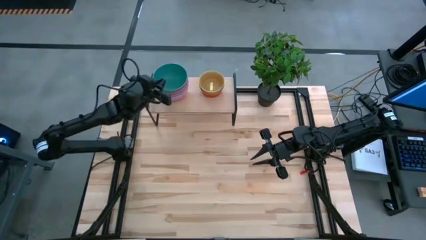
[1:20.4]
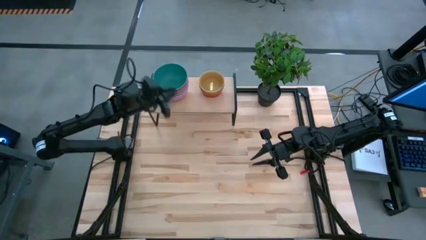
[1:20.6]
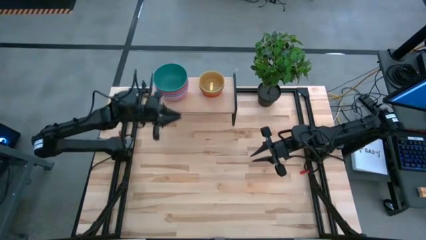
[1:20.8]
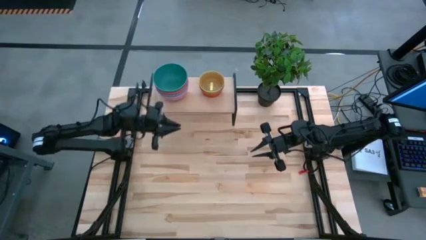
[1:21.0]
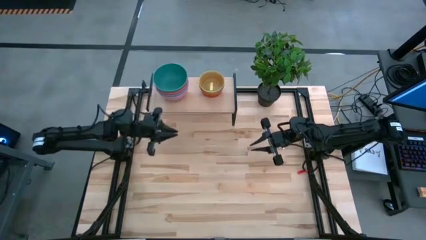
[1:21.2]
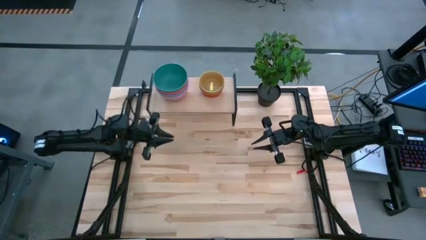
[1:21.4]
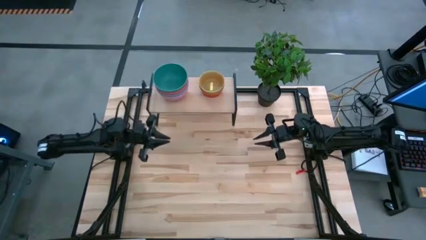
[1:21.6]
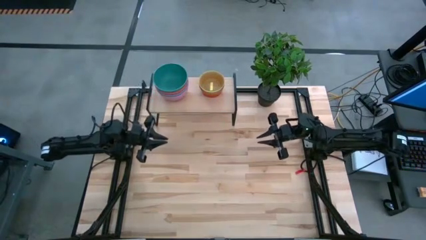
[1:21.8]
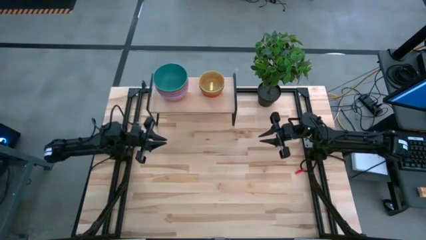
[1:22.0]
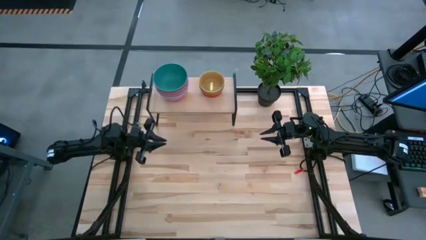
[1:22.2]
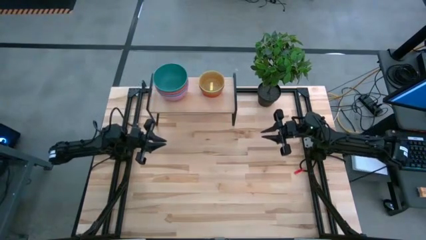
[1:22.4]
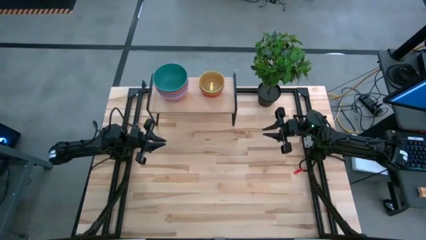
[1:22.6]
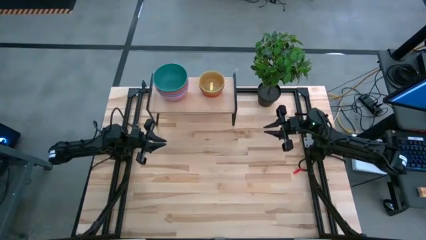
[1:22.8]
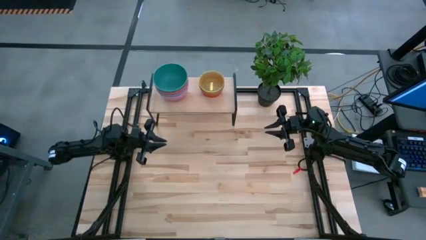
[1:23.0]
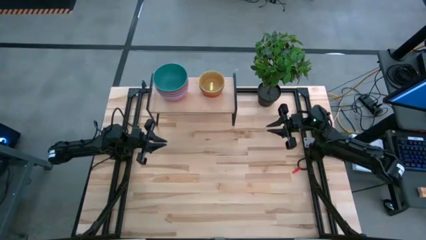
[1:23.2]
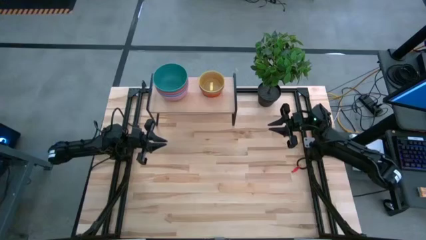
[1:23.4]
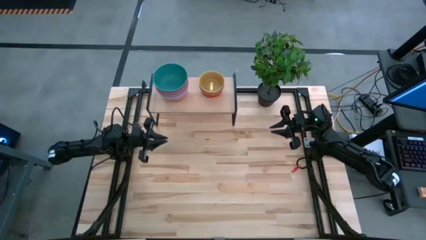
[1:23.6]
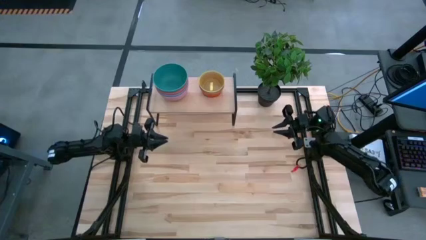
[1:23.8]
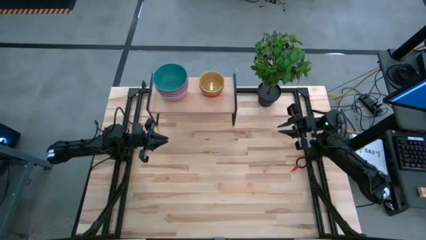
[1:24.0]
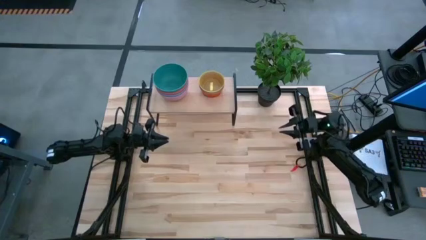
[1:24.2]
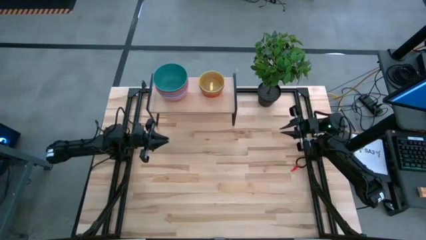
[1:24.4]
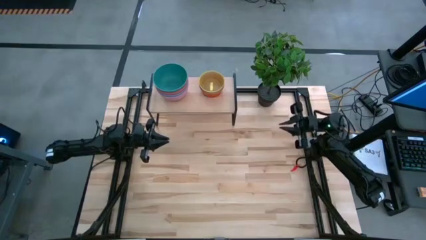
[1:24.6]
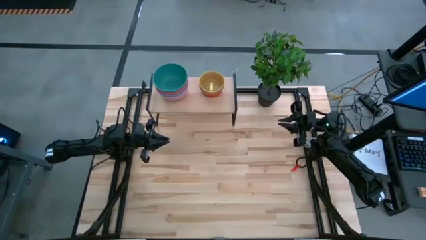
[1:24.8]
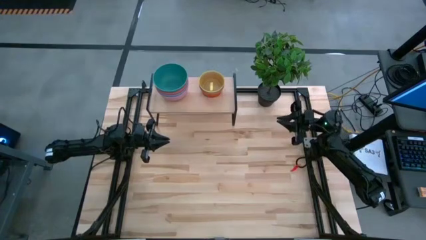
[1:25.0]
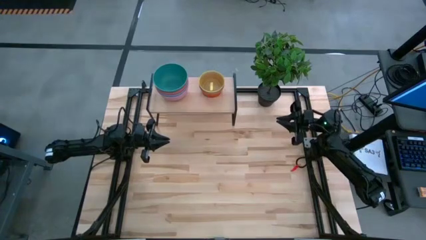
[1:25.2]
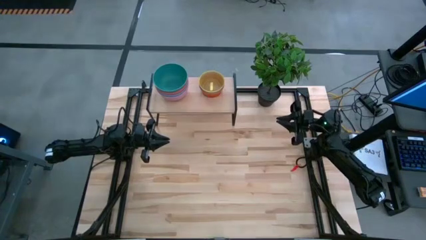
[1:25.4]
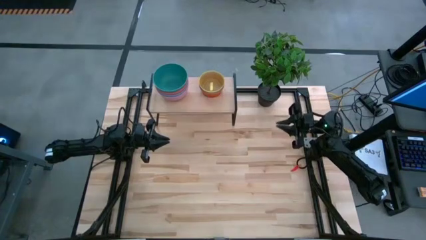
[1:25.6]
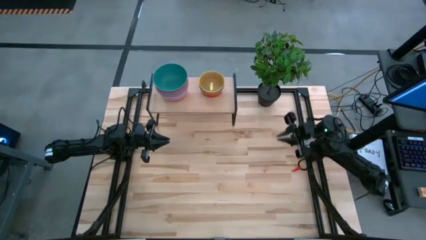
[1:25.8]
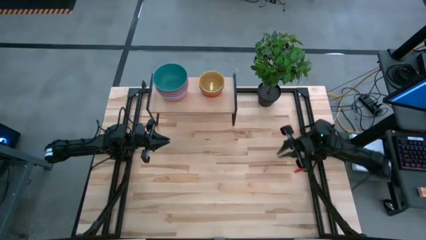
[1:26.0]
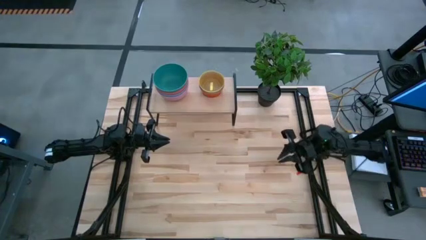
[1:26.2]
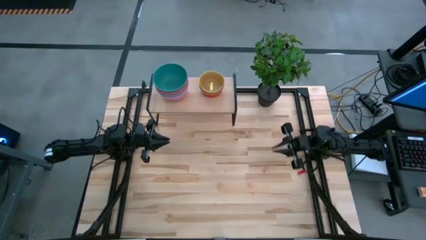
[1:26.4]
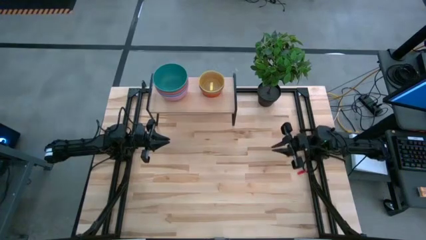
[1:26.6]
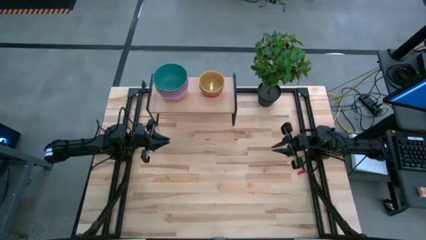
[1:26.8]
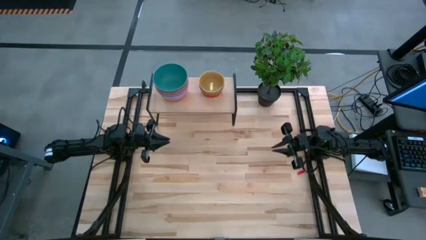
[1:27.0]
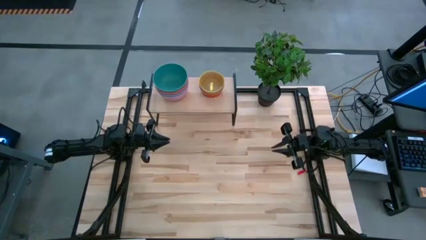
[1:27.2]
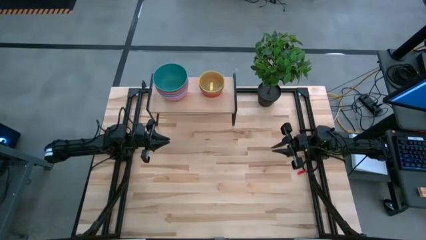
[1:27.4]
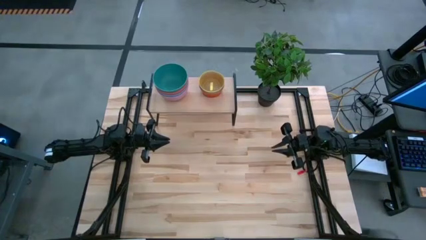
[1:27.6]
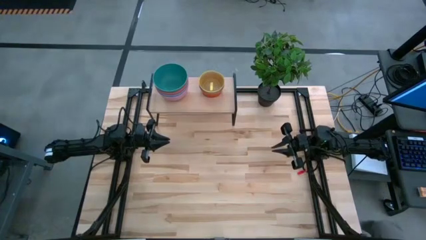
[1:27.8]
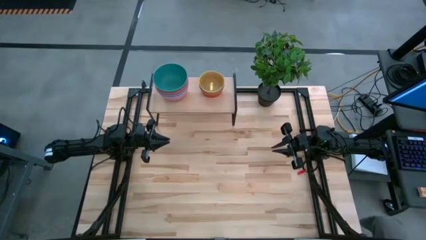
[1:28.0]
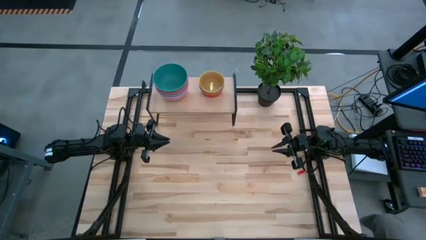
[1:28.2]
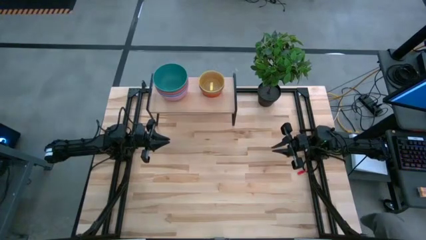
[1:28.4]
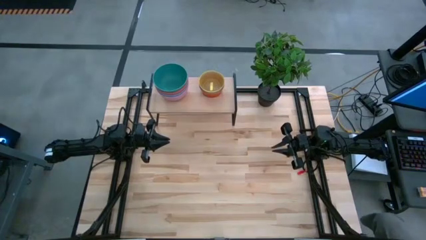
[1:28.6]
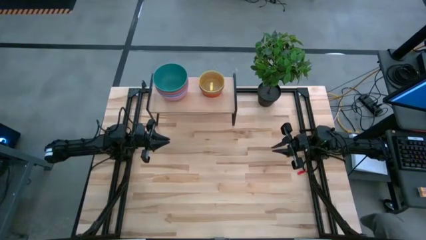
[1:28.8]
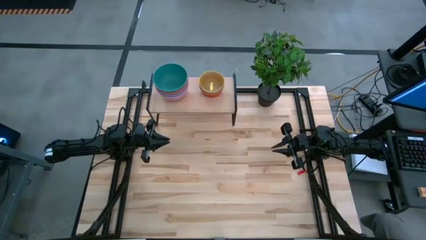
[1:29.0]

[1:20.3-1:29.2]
Task: Place and stack bowls onto a shelf
Return to Home Position

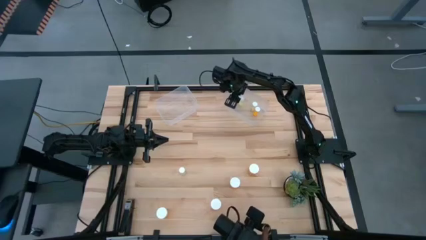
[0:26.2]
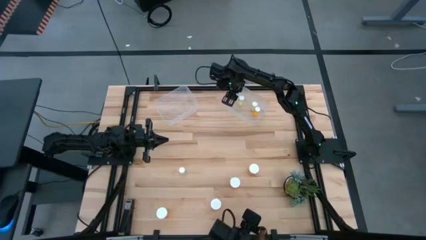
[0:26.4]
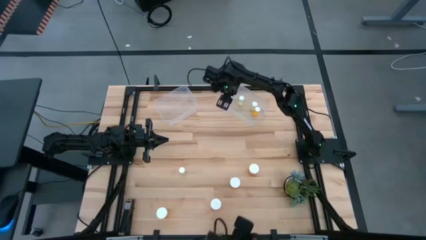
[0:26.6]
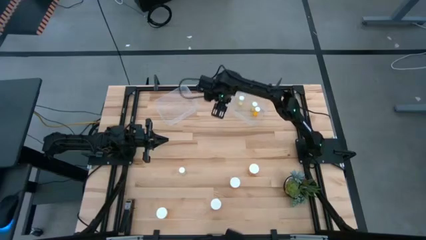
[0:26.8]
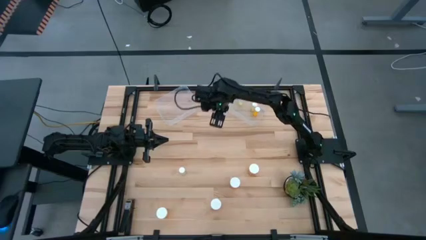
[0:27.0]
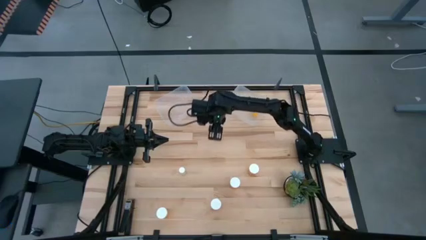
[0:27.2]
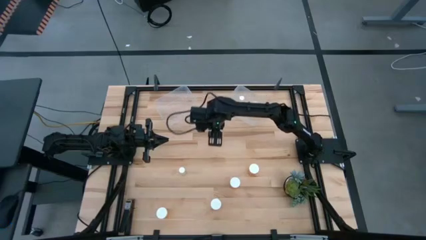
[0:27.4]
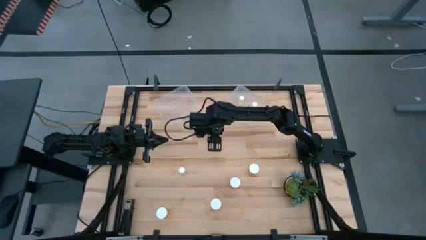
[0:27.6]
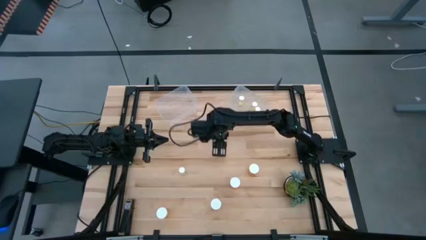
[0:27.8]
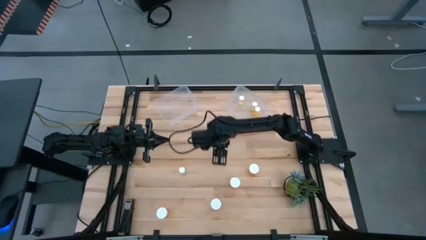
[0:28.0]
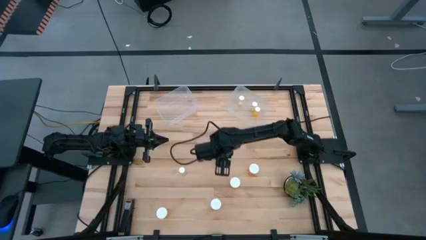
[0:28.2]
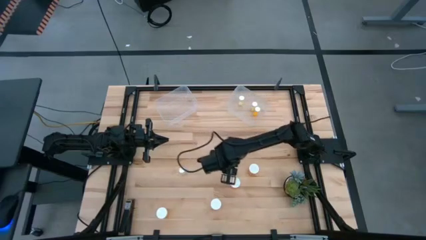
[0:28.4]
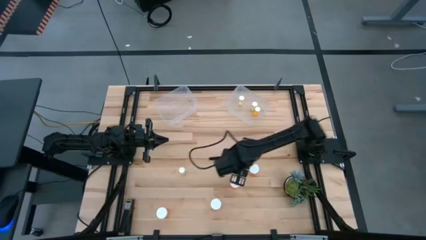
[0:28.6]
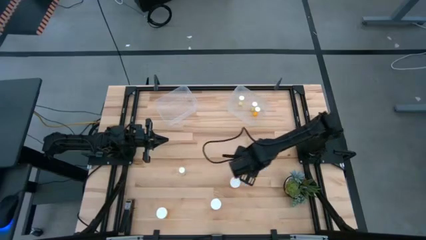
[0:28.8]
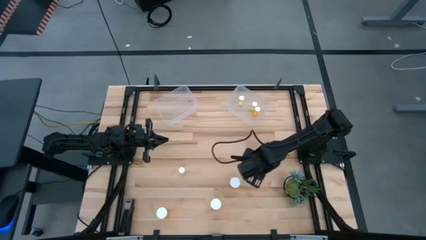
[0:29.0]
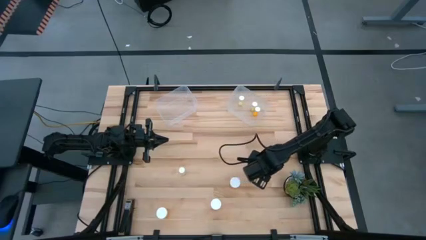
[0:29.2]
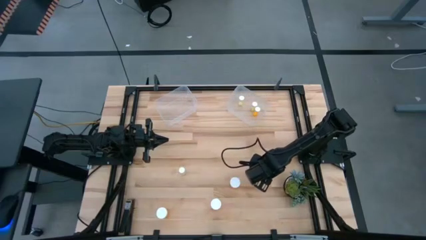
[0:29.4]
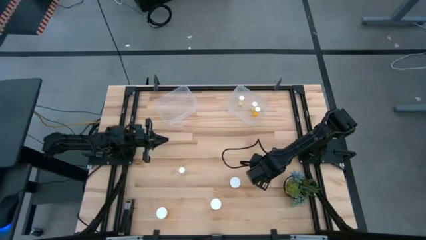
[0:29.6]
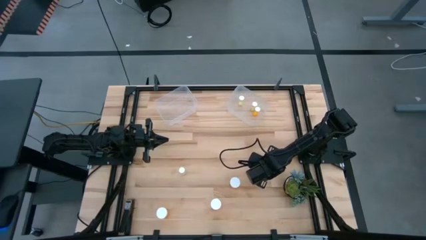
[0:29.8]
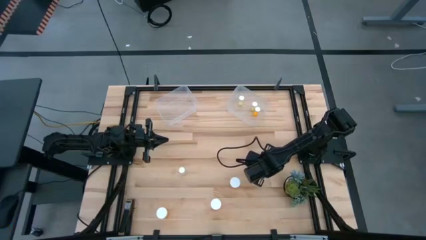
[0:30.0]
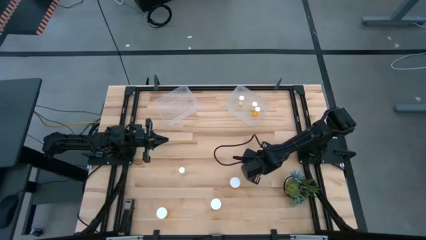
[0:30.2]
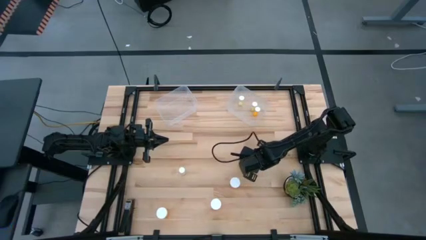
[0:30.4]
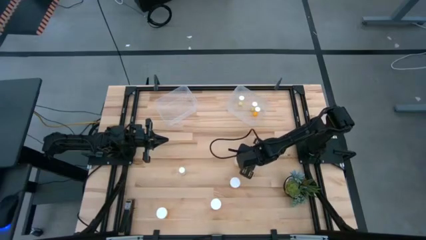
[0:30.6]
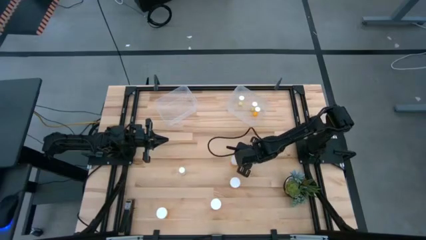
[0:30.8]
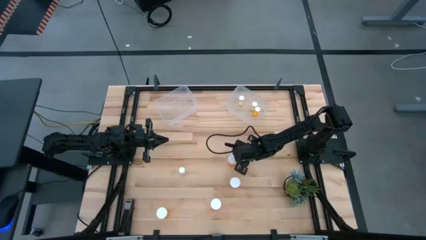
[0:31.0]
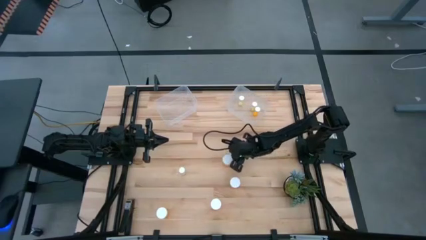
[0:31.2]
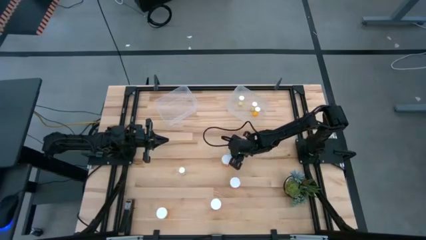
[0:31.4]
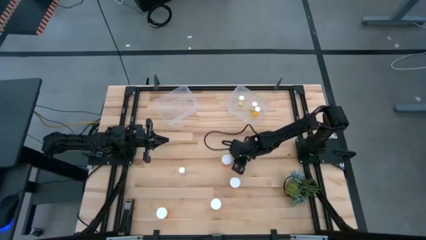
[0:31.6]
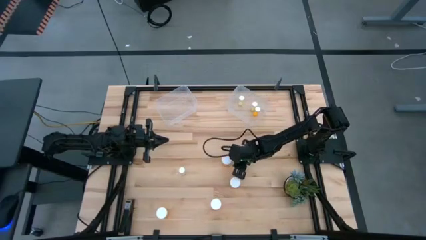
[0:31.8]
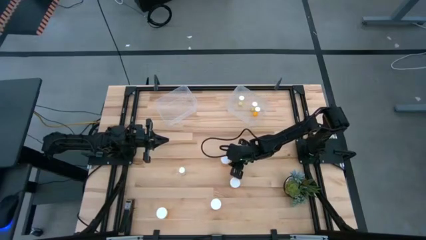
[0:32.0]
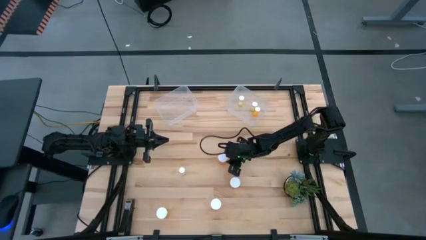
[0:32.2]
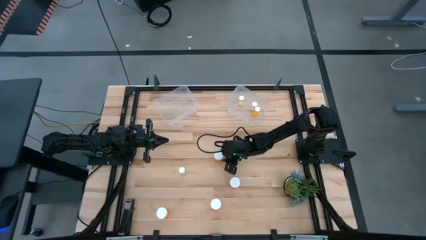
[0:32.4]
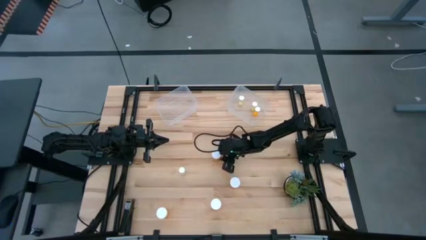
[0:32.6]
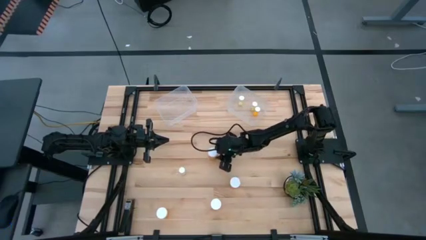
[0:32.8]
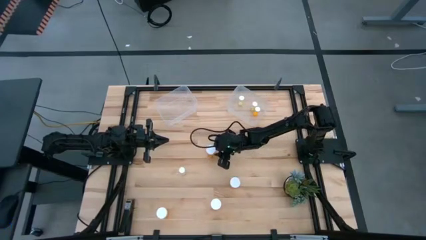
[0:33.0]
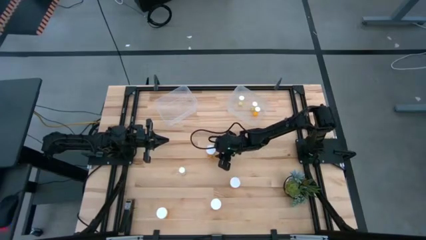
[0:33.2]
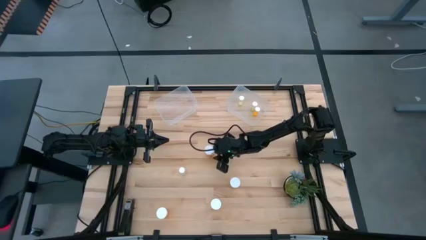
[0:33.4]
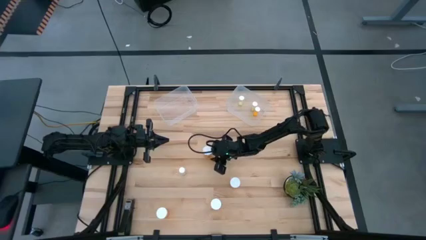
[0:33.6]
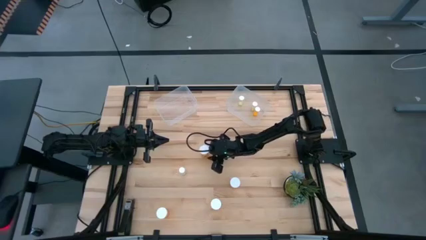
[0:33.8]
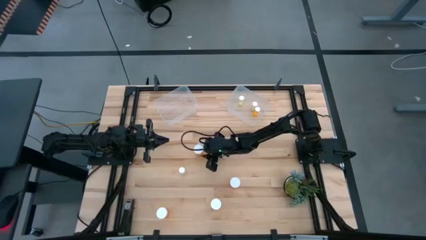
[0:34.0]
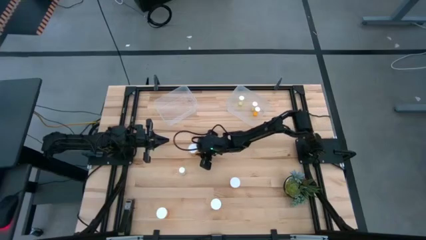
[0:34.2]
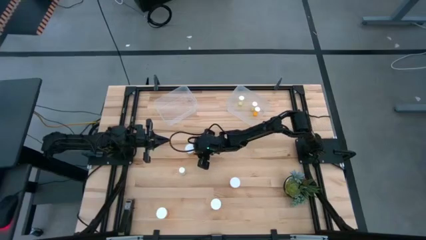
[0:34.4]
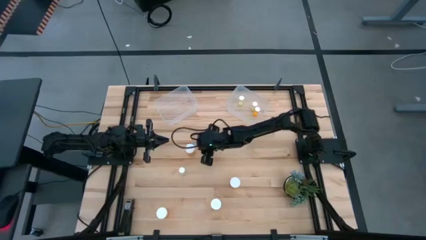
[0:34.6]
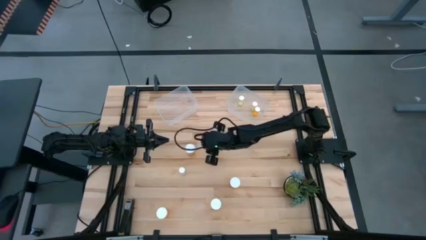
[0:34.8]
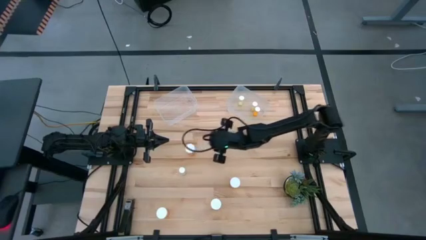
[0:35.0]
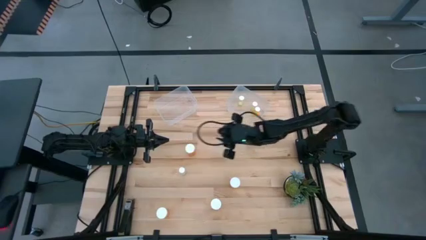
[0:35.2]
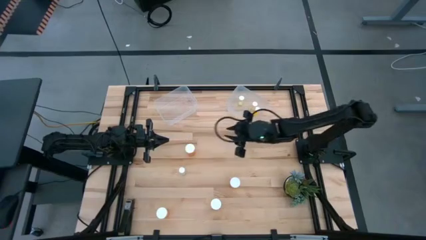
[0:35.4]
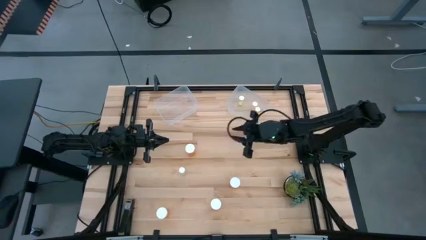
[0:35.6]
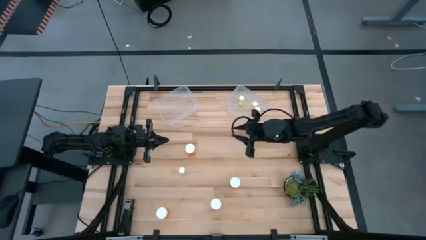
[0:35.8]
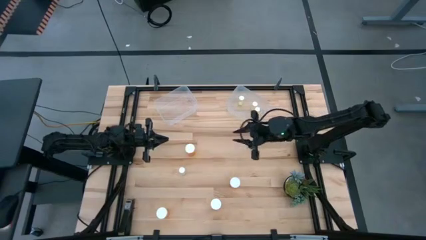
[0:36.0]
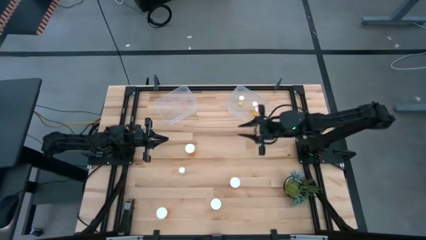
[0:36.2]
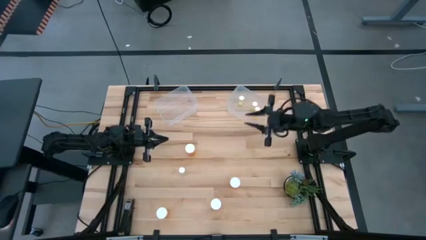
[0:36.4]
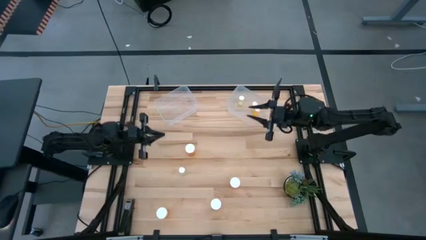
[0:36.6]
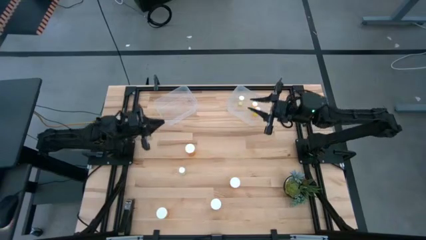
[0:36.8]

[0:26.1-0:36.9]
Task: Pick and place medicine bottles into bin by pill shape (circle, oval)
Put the large orange pill bottle into the left transparent bin
